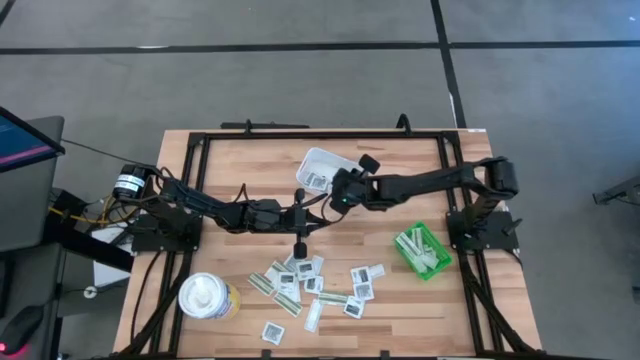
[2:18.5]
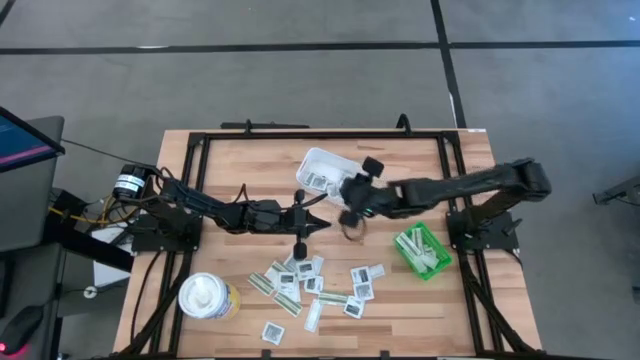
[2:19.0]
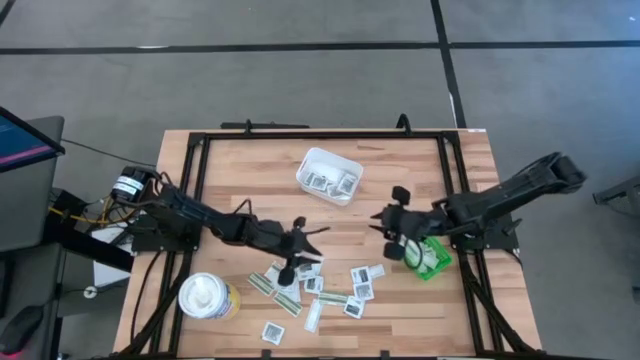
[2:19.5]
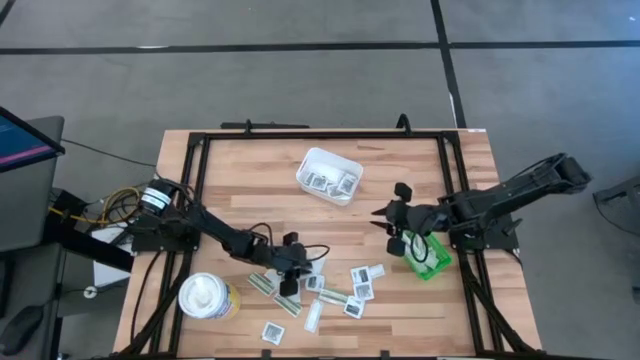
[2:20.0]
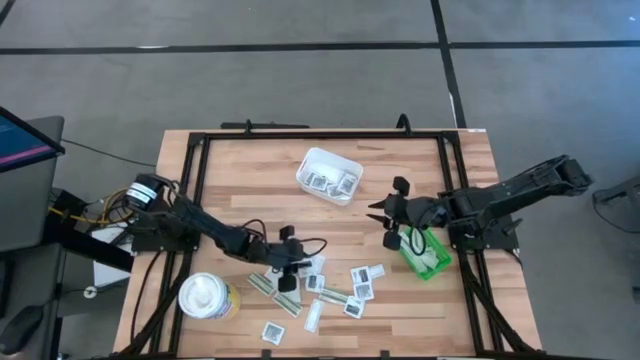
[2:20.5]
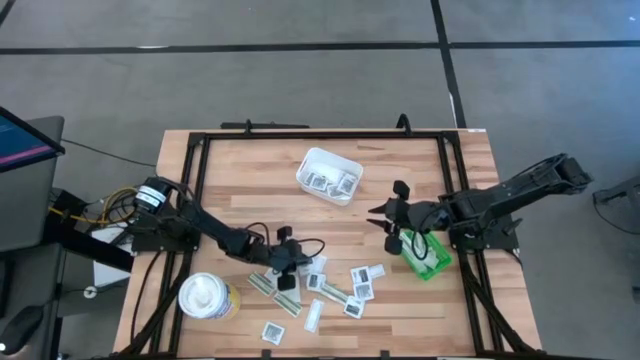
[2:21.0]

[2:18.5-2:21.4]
Task: Pick & Place First Aid Supplies
Put the towelette pack into the white bin

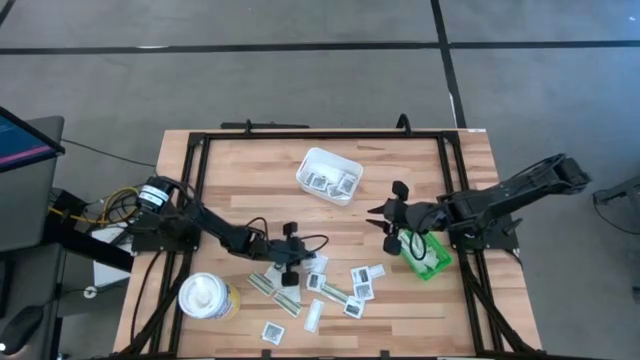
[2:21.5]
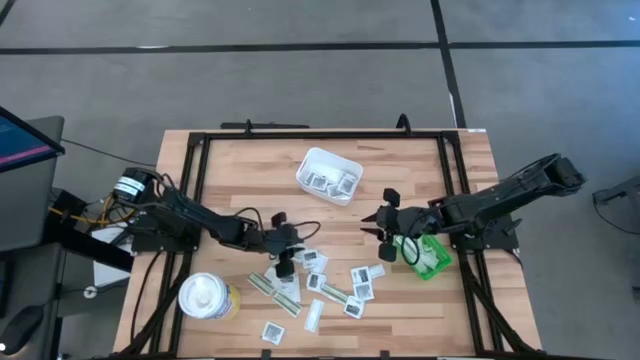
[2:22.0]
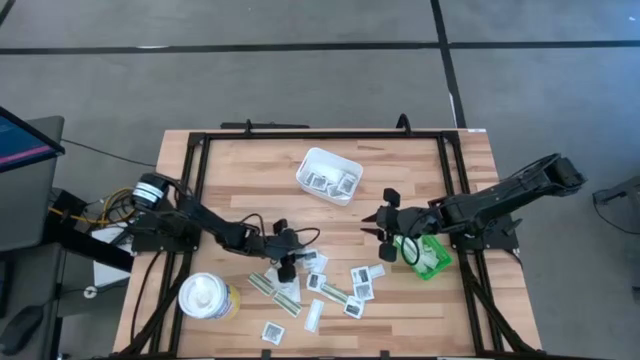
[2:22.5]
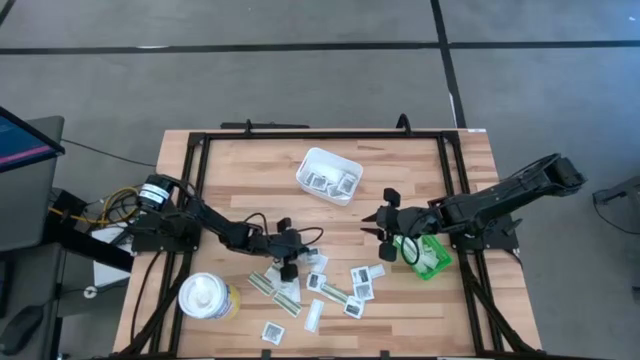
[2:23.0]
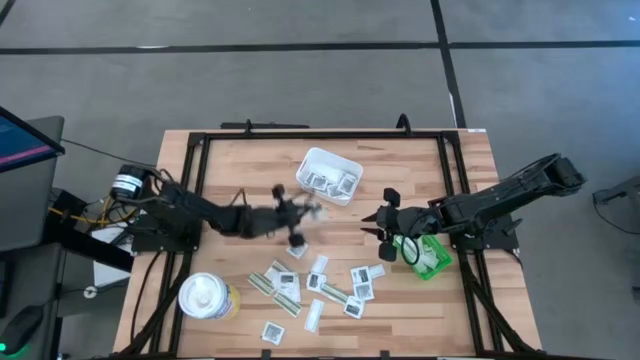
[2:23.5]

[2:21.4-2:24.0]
Put the towelette pack into the white bin

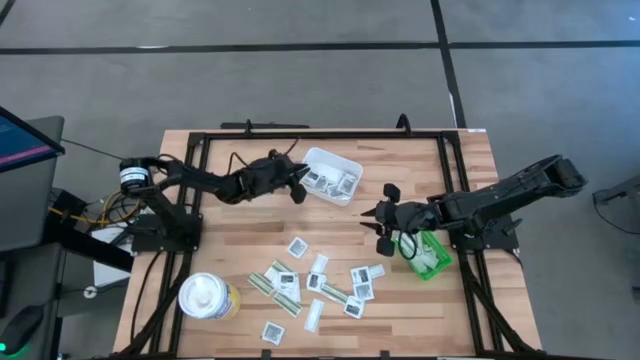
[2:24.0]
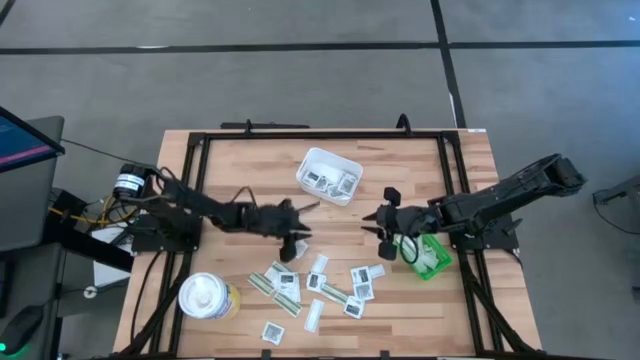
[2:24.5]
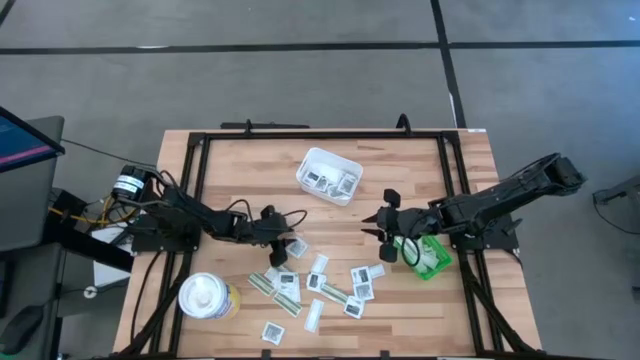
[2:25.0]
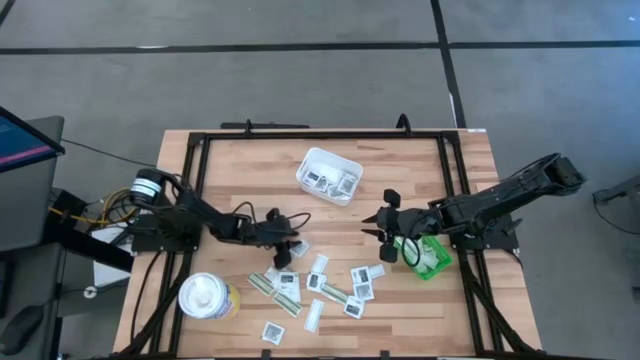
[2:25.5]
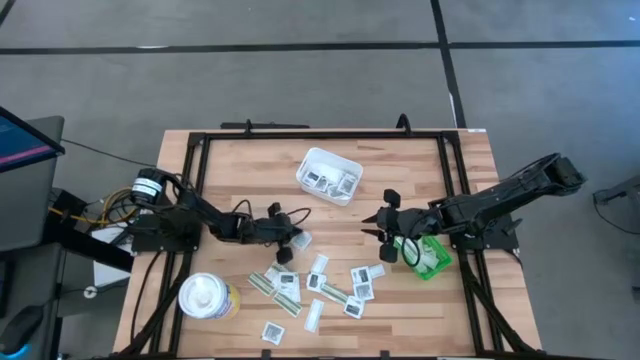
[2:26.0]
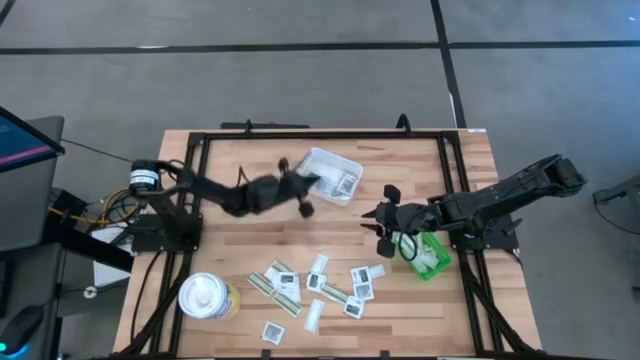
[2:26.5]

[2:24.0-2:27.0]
Put the towelette pack into the white bin

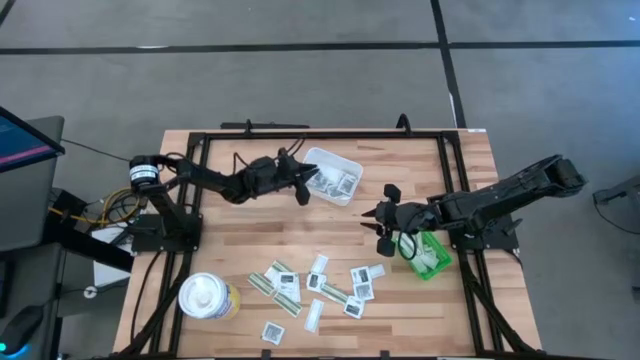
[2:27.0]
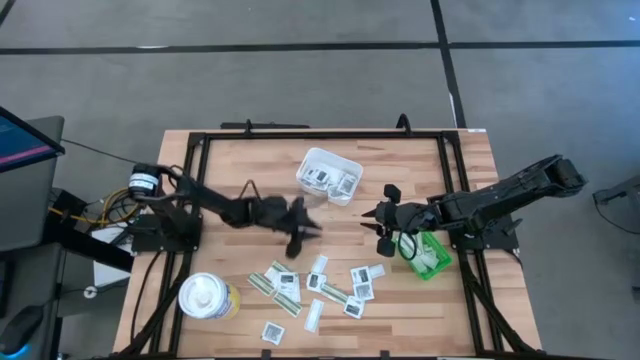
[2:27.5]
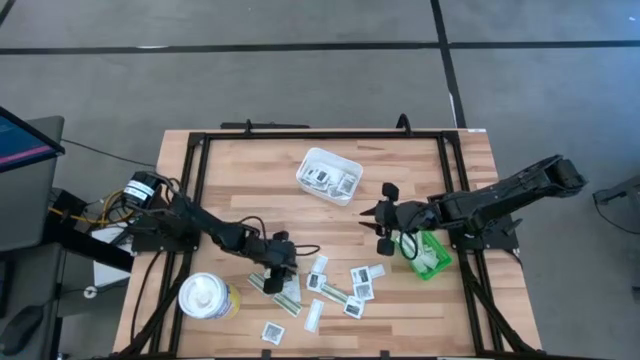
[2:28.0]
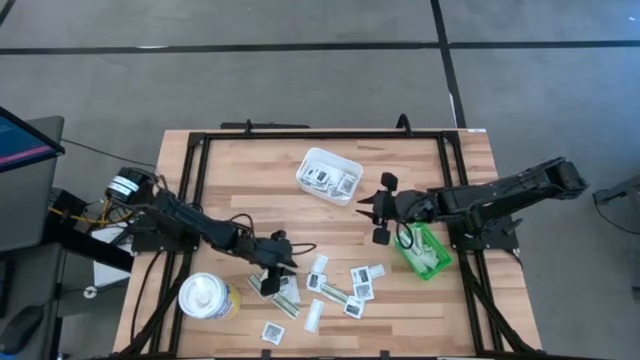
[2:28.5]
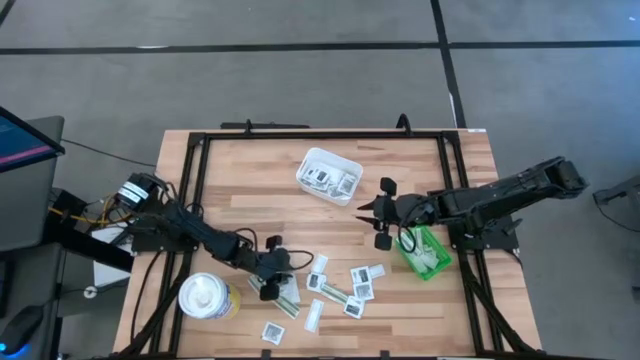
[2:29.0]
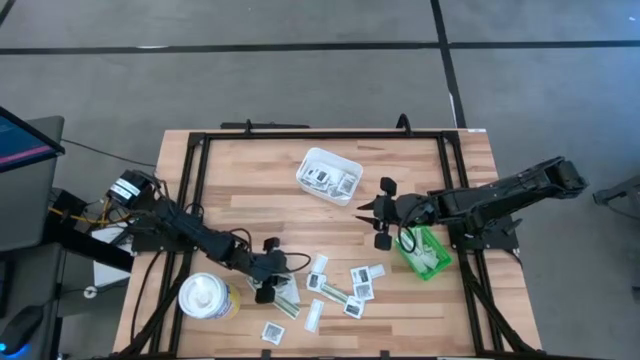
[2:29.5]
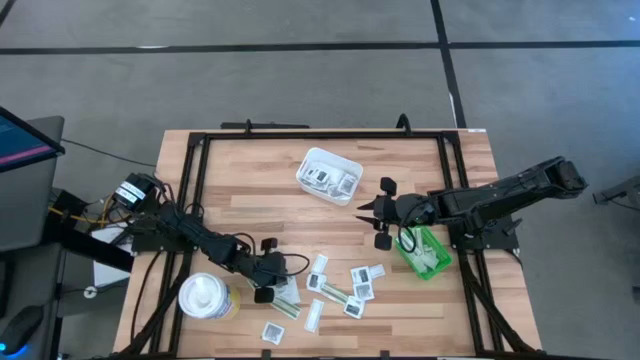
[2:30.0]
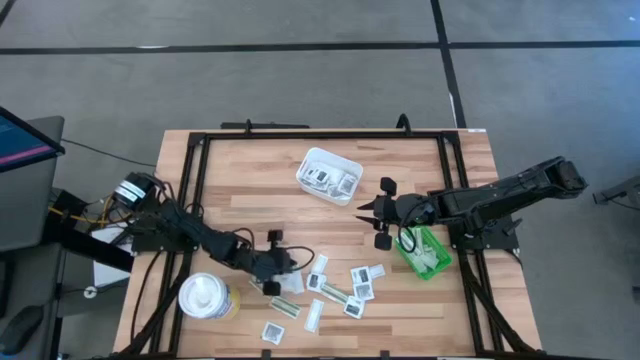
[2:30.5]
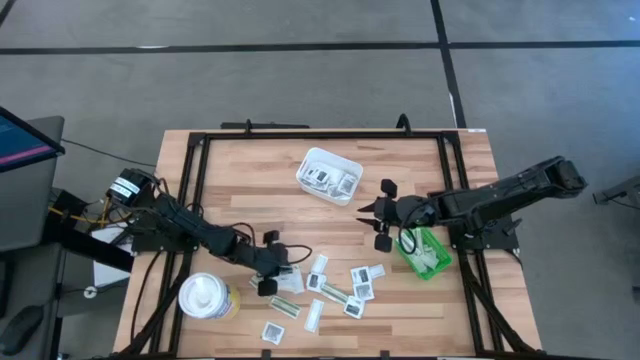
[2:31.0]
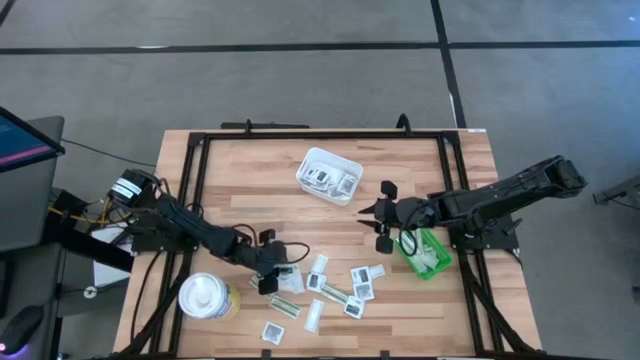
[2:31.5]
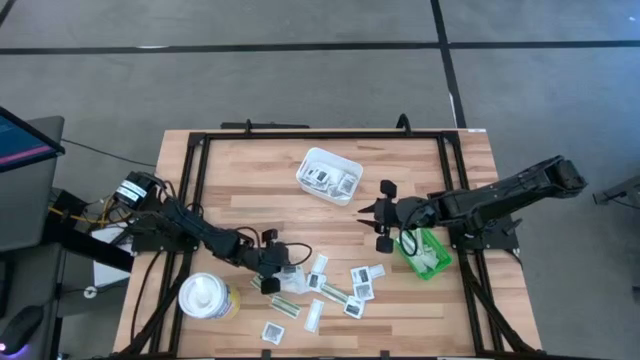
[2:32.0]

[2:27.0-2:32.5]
Put the towelette pack into the white bin

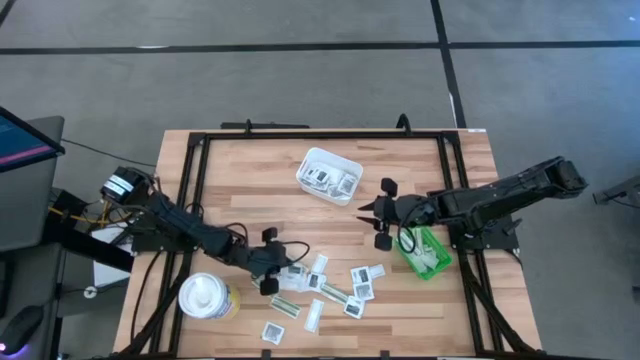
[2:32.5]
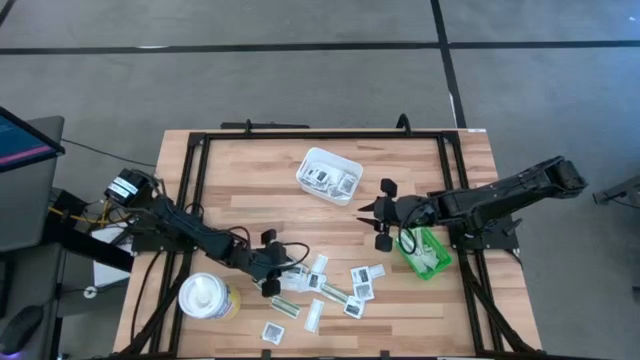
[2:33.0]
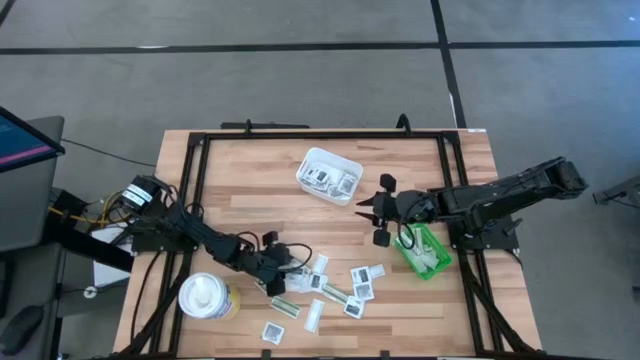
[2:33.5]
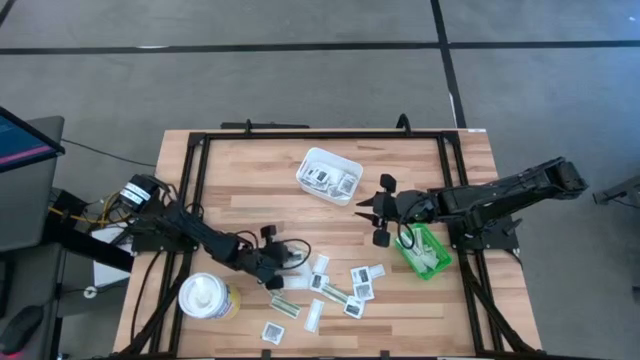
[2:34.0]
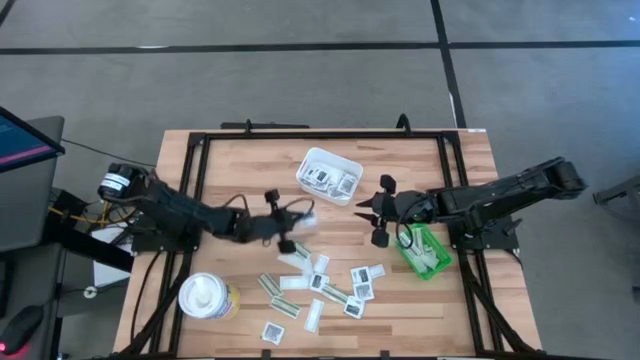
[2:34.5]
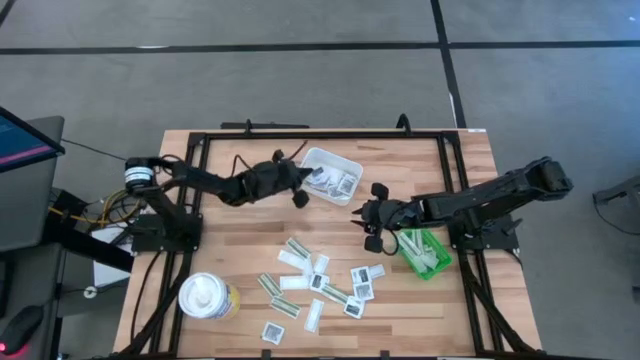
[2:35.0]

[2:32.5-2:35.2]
Put the towelette pack into the white bin

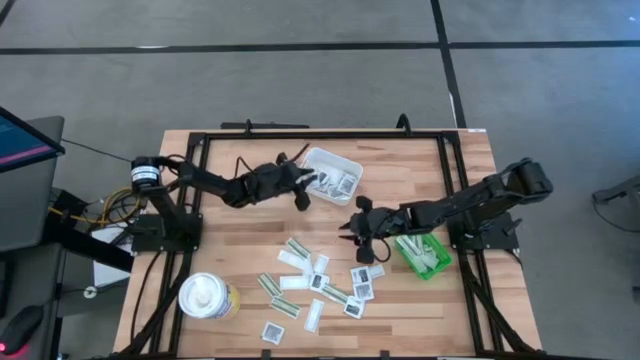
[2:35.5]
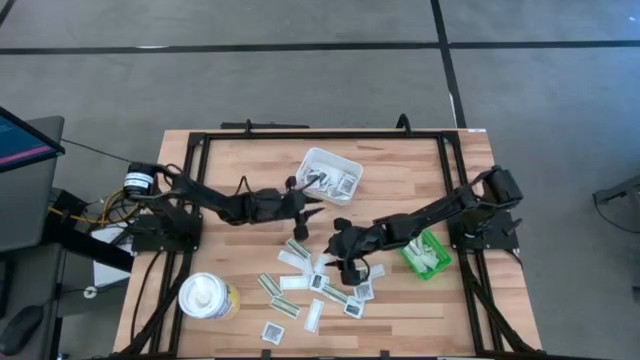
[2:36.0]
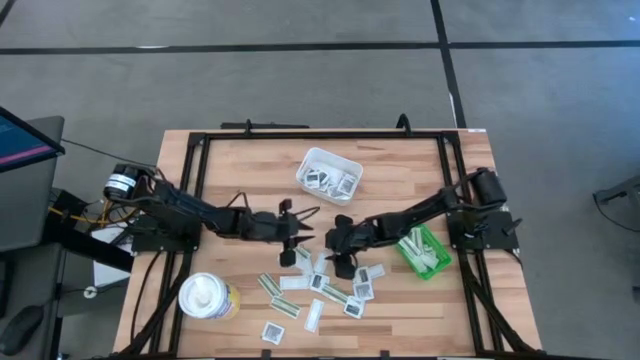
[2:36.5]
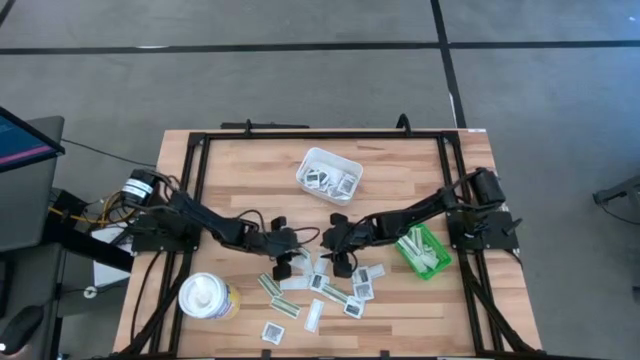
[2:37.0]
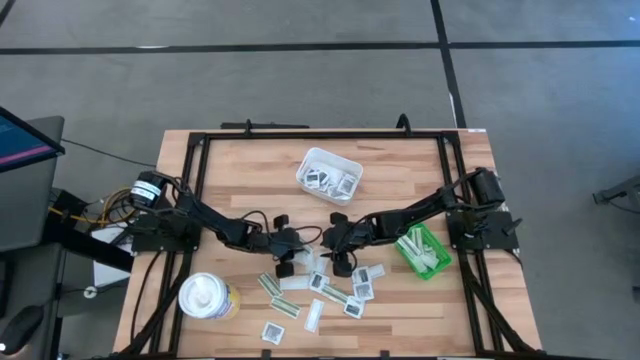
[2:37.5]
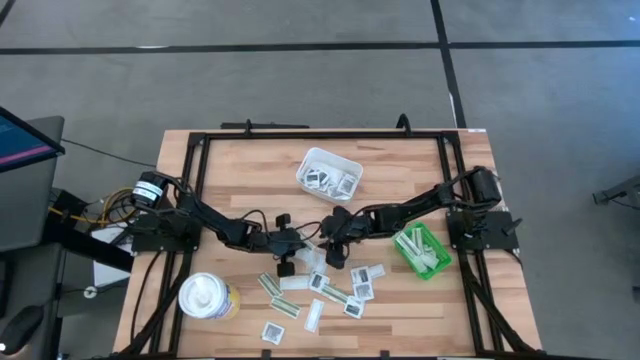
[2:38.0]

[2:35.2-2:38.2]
Put the bandage pack into the green bin

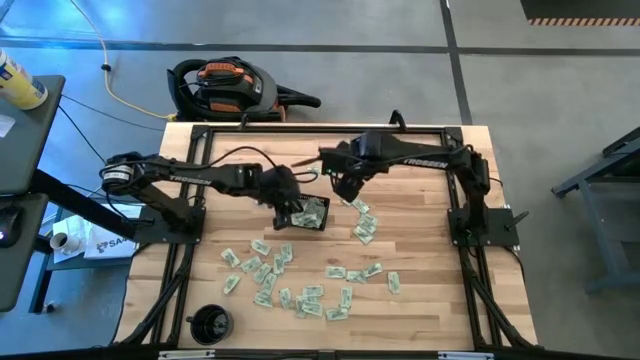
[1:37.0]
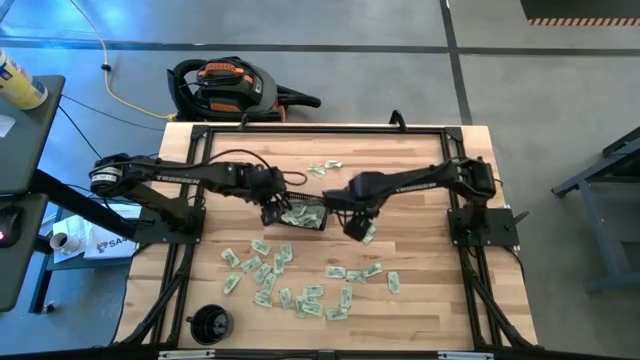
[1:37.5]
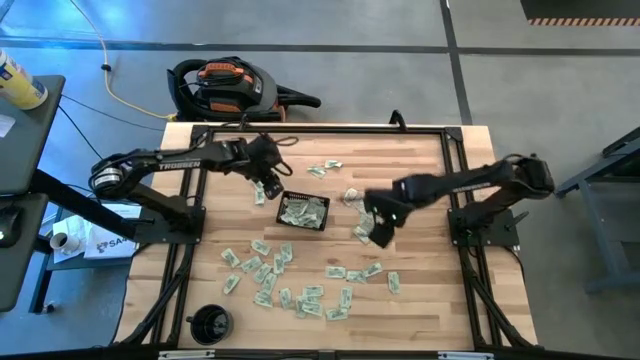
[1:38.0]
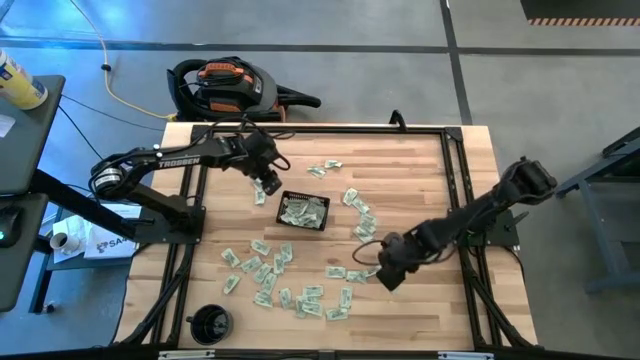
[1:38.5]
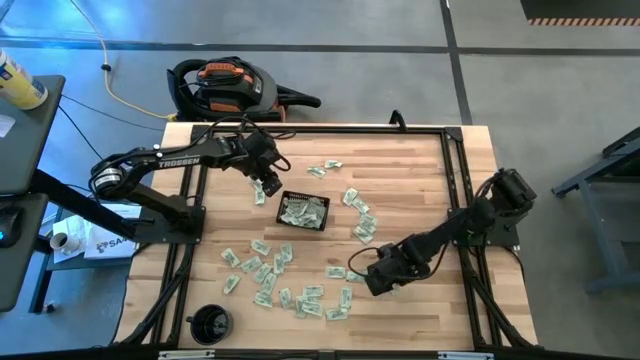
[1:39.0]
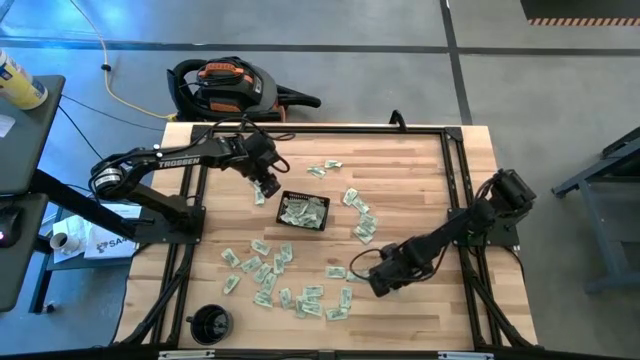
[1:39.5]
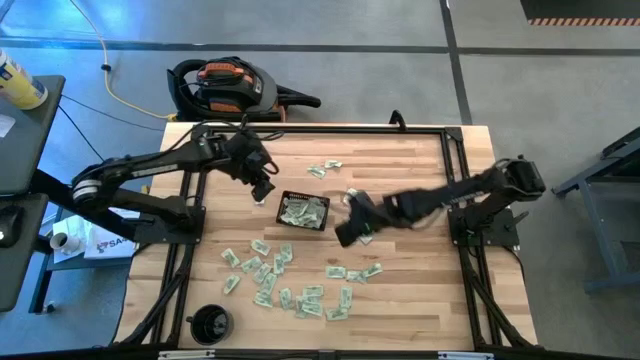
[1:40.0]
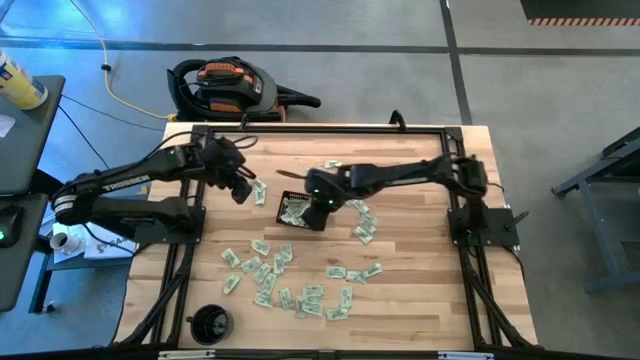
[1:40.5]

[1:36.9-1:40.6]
Task: Pick and place Stevia / Truvia into bins
Put the green stevia packet into the black basket
